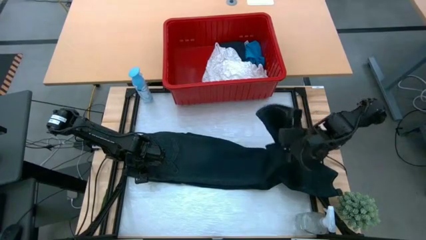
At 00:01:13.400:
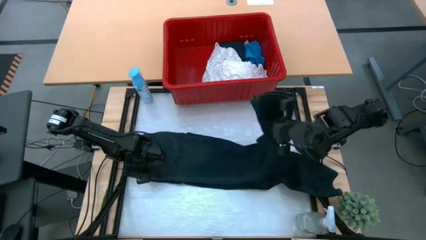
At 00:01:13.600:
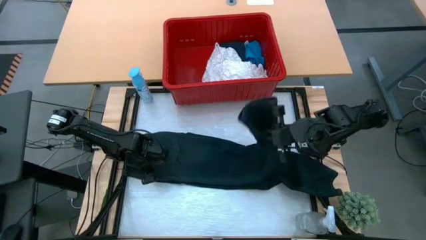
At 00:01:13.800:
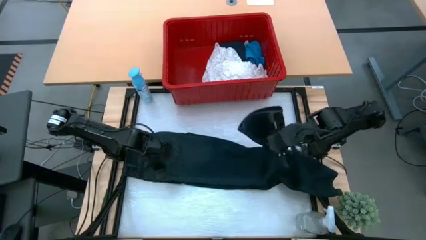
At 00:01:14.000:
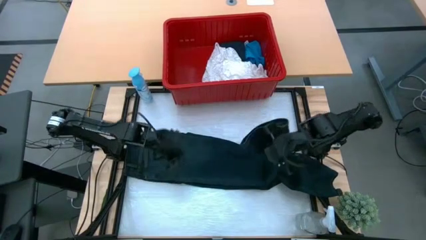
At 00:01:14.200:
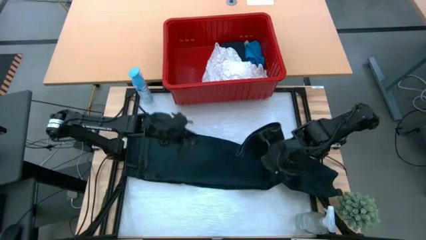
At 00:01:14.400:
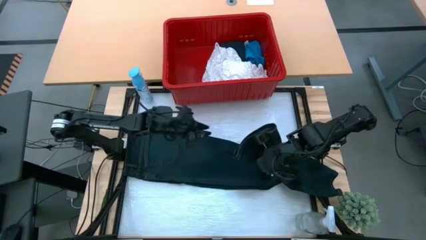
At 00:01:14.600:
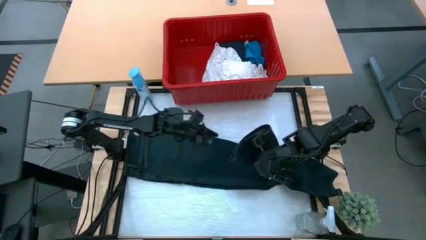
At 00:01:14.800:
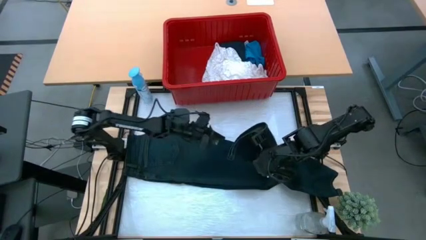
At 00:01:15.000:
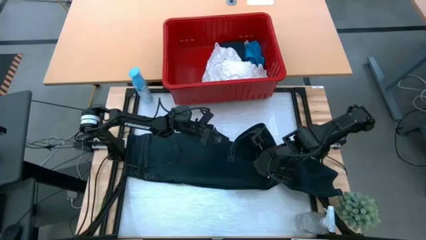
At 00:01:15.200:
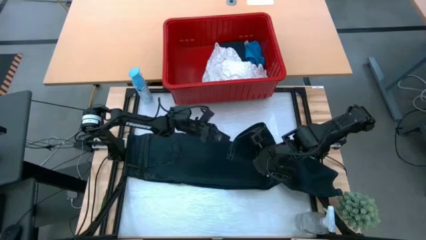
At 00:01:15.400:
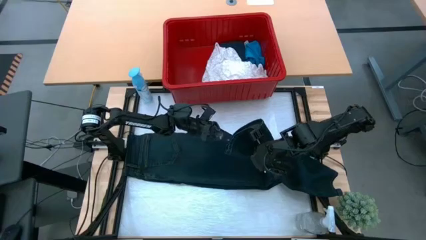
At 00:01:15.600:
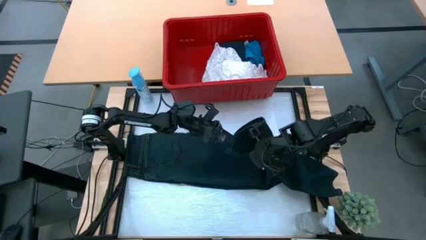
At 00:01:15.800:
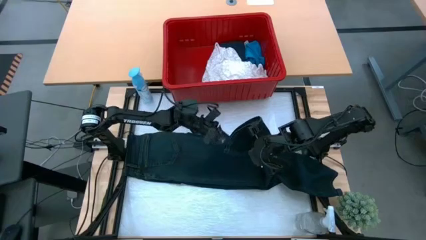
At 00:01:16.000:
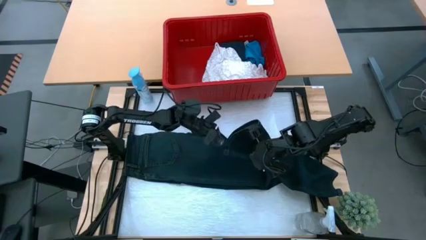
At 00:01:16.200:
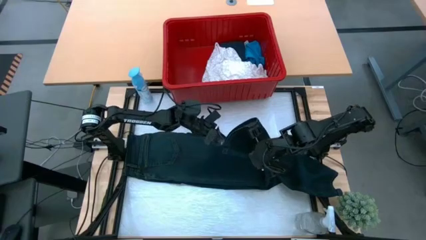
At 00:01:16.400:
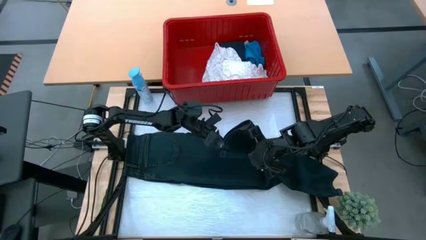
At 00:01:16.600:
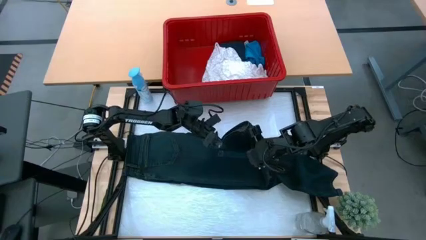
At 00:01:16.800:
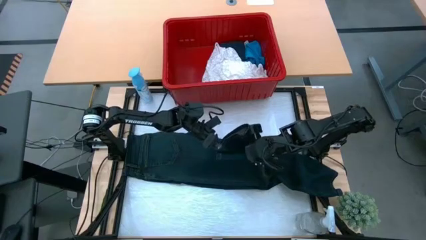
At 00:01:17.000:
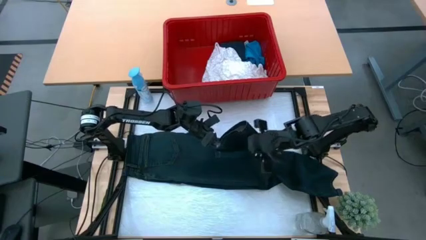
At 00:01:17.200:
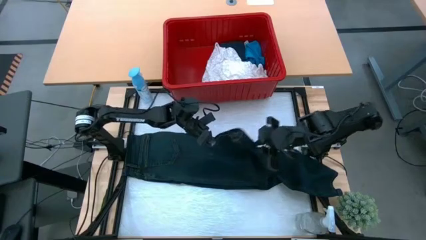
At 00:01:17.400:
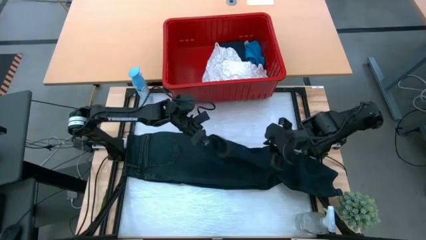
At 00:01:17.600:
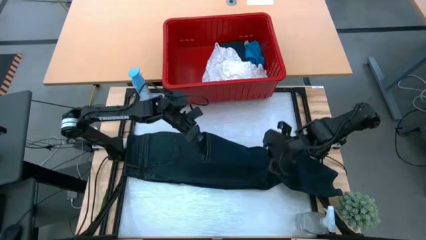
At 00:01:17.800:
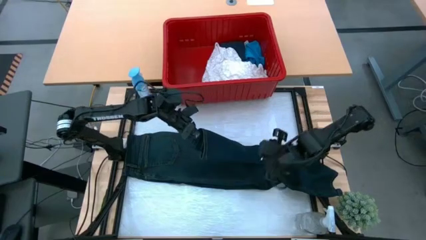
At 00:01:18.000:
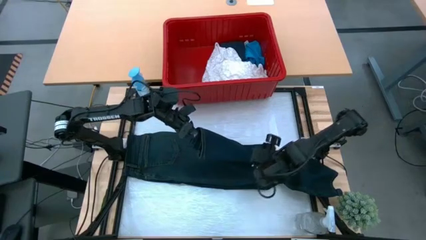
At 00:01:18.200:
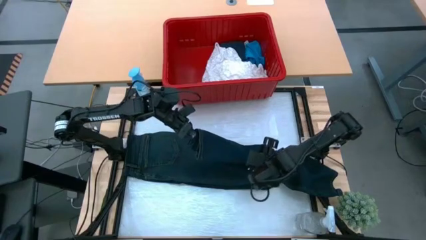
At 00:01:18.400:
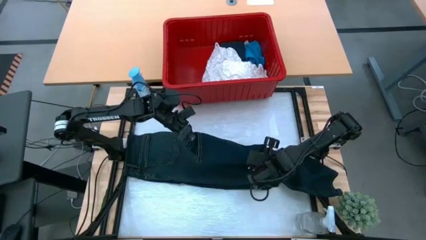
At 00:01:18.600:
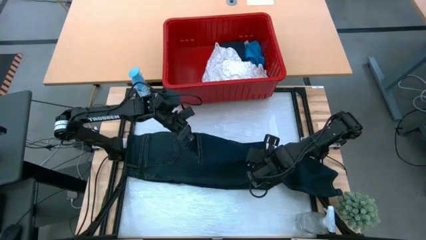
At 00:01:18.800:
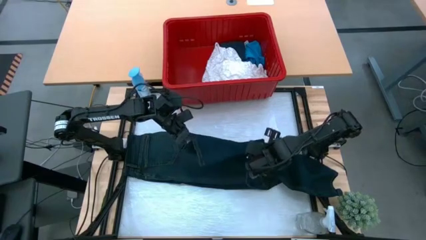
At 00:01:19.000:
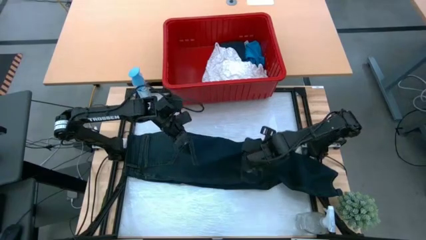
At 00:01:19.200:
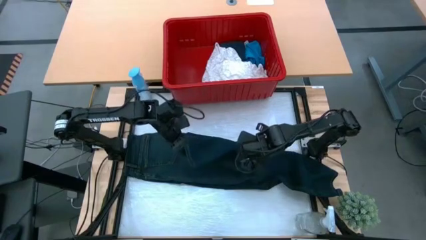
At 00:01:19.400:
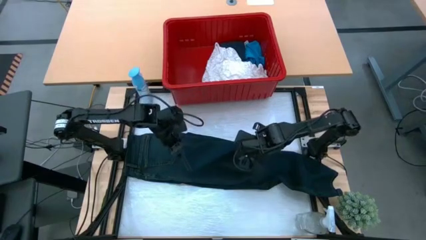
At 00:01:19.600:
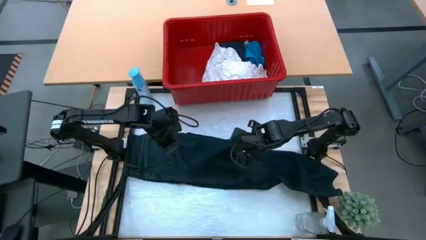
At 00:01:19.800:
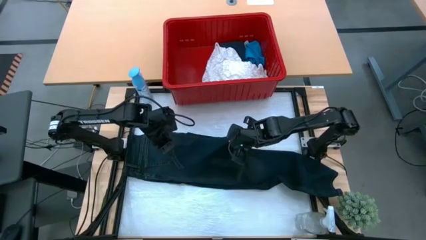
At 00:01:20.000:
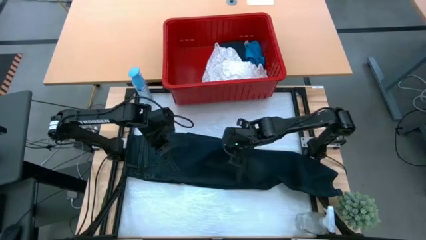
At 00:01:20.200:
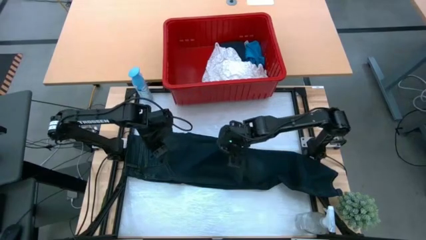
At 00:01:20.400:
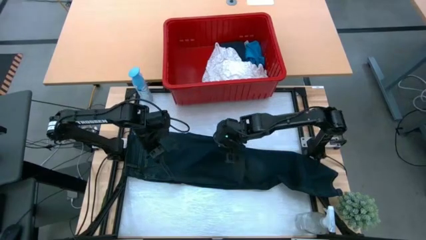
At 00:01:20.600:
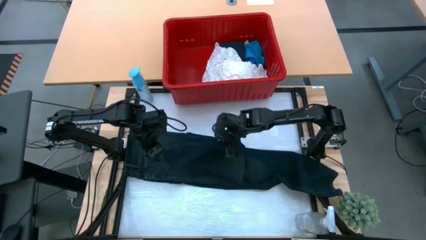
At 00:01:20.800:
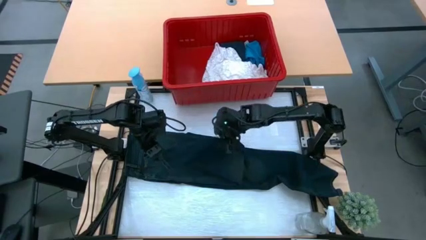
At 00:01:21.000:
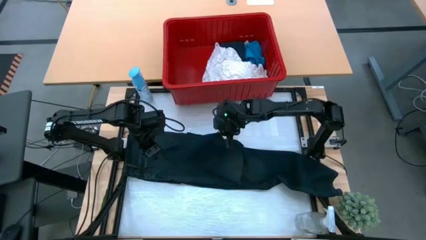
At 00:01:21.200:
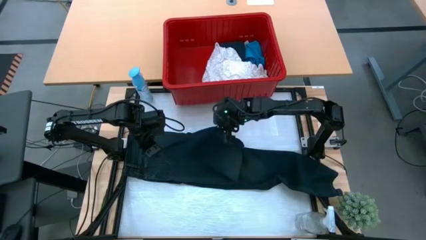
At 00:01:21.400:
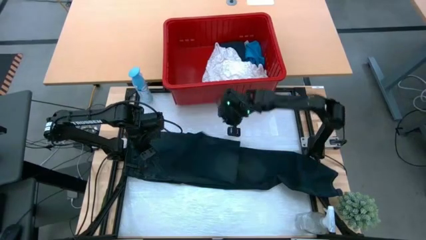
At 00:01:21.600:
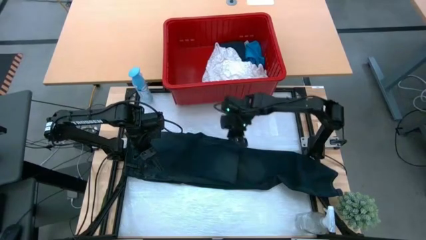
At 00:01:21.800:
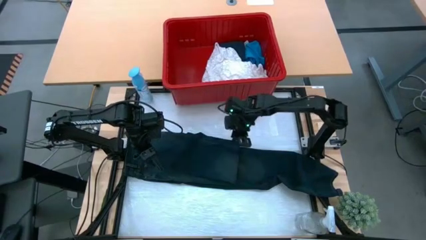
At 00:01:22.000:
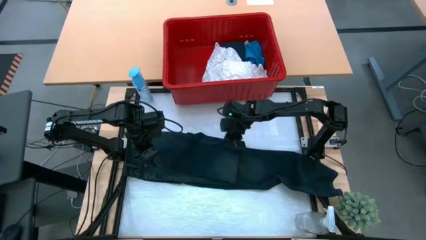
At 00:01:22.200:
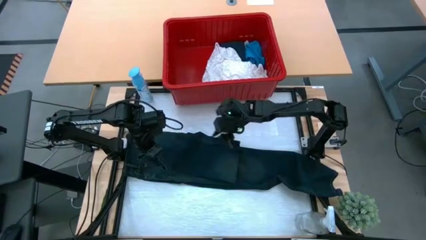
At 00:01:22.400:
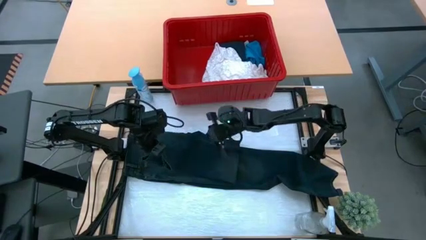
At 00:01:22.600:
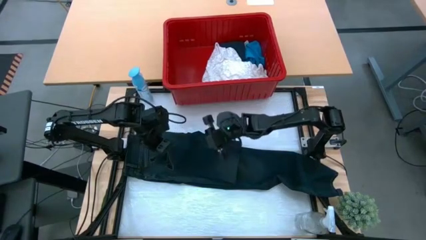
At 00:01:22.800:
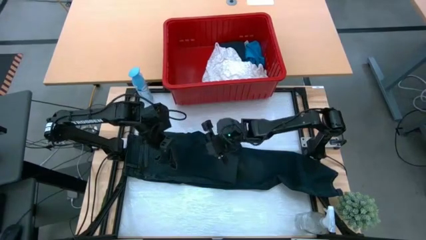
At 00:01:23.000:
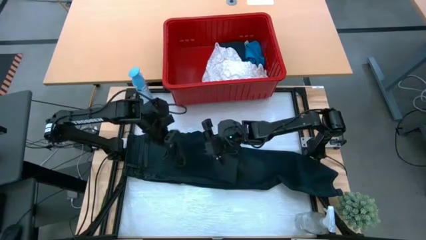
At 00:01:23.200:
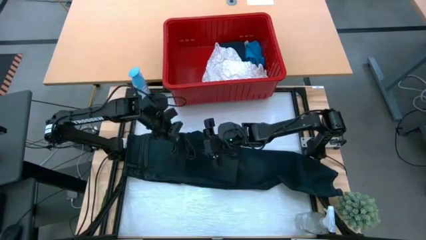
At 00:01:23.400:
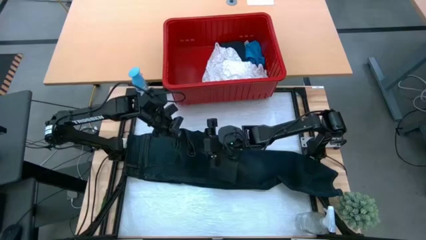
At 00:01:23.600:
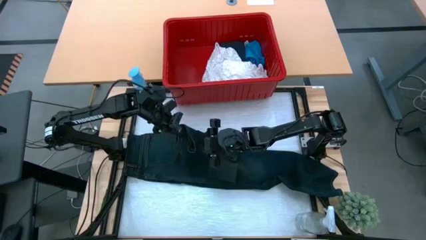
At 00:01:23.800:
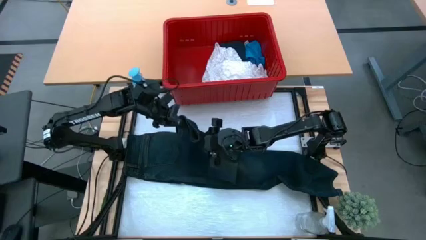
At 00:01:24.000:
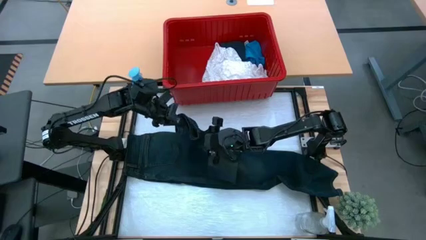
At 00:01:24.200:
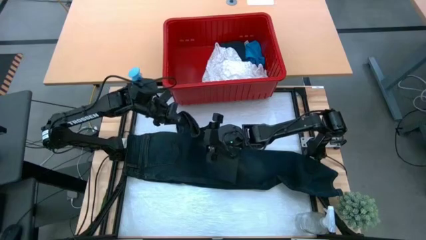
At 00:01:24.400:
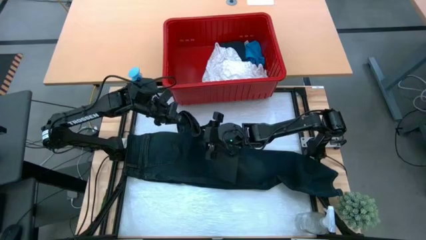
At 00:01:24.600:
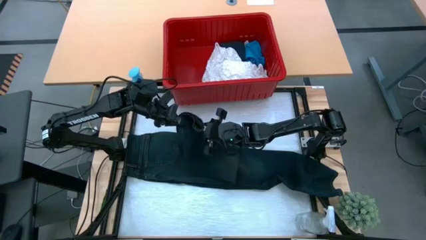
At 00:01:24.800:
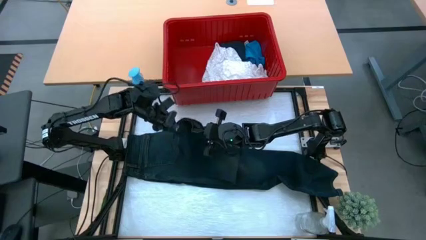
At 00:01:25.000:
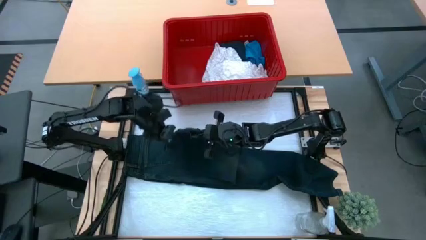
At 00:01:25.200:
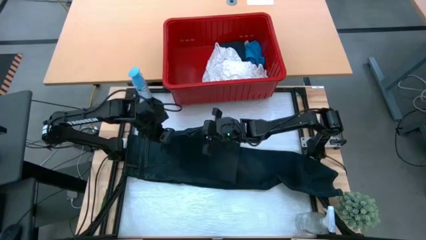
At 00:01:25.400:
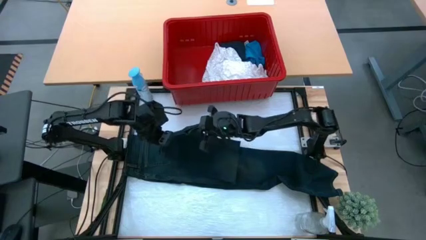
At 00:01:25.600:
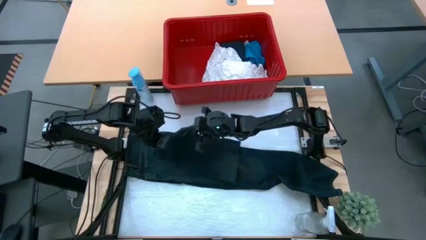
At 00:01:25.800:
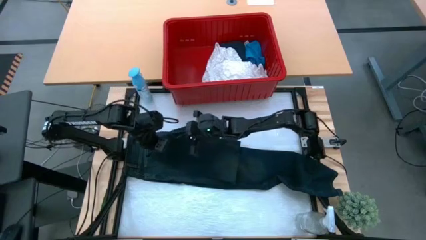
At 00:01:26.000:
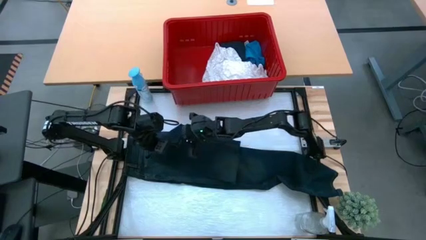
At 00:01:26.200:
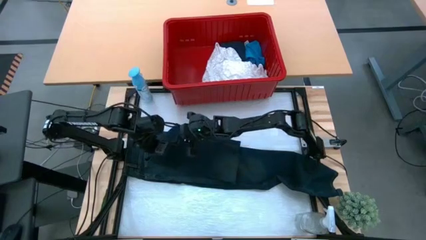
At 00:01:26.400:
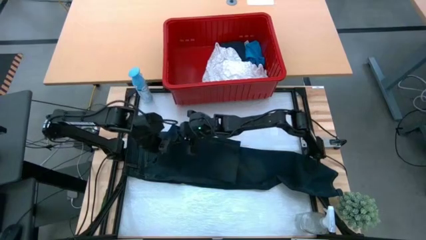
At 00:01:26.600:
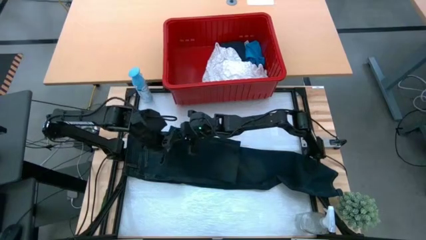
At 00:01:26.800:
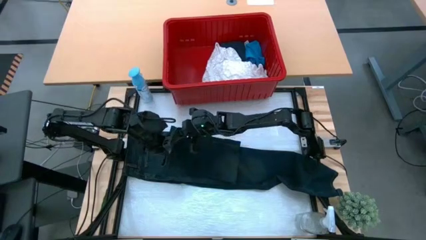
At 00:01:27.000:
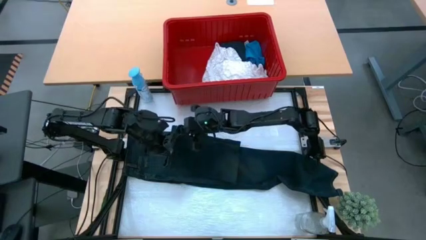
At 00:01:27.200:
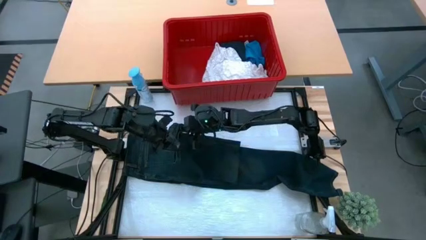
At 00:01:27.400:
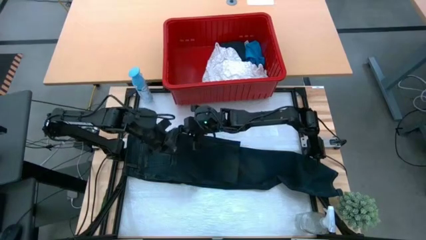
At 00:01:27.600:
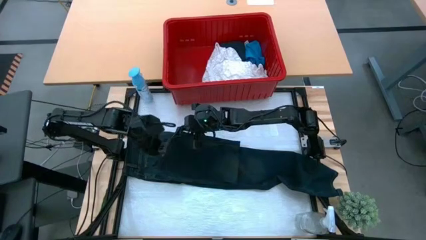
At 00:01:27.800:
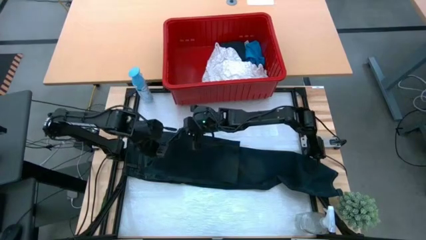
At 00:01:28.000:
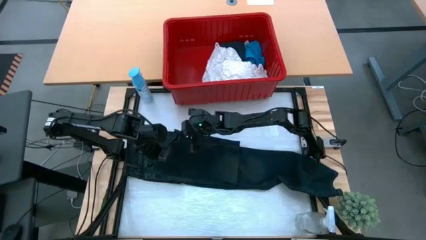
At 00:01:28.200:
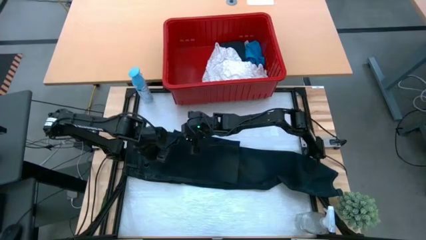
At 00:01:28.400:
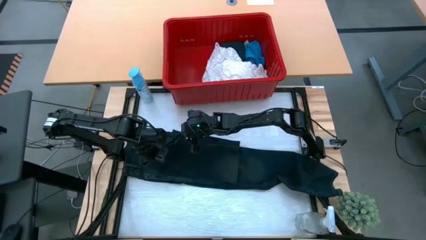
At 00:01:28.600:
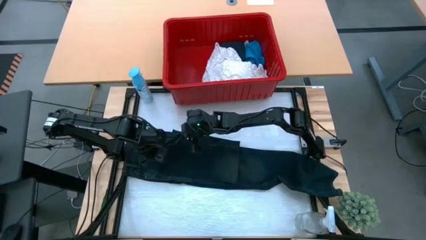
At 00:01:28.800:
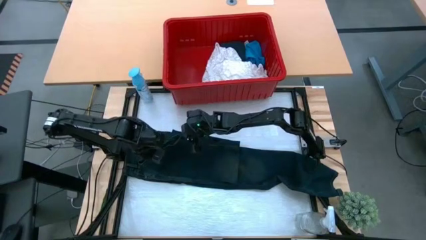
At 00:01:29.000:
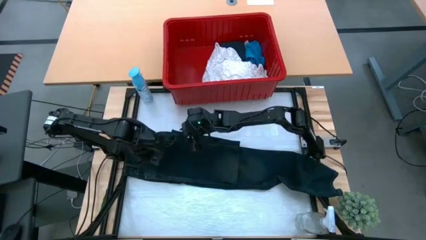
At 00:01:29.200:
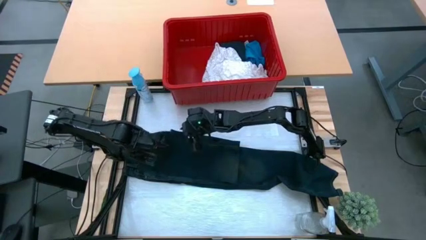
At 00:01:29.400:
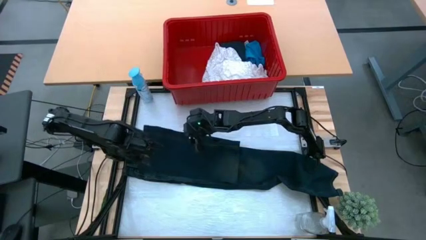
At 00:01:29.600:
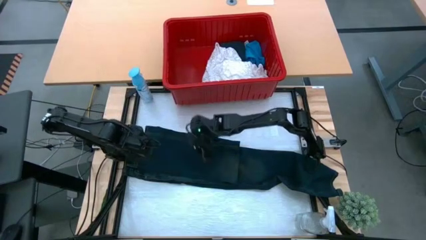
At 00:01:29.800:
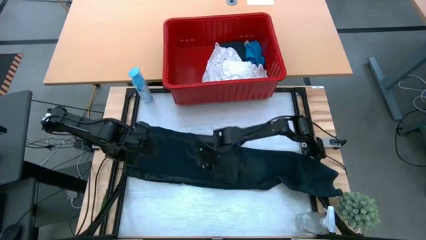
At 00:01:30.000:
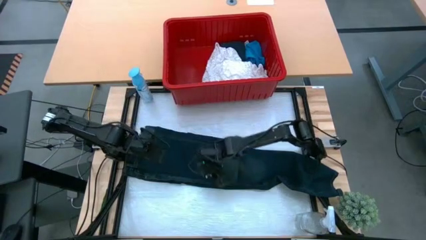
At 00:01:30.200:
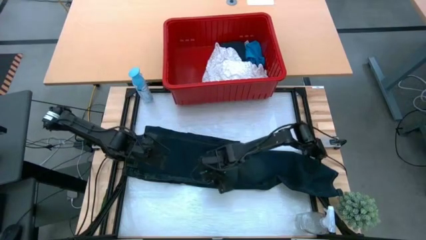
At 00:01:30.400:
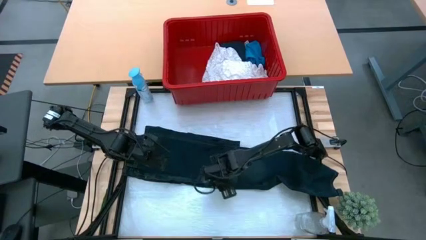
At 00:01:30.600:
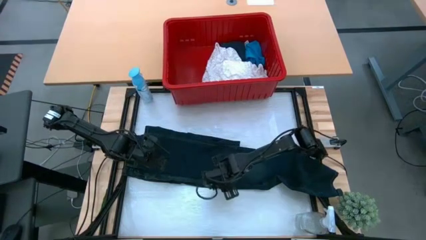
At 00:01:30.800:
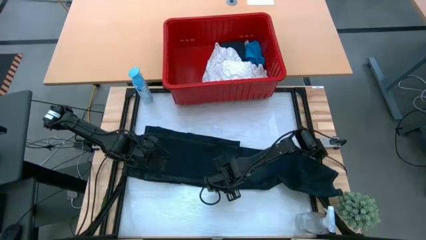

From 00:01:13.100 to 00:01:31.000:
Task: Fold Laundry from Bin
Fold the black pants from the red bin
